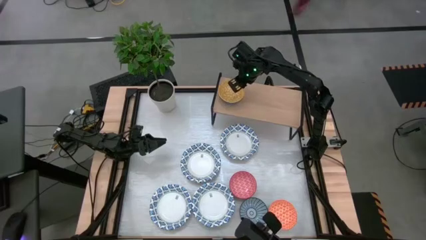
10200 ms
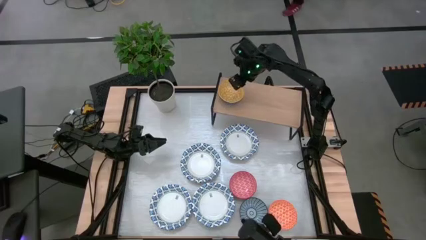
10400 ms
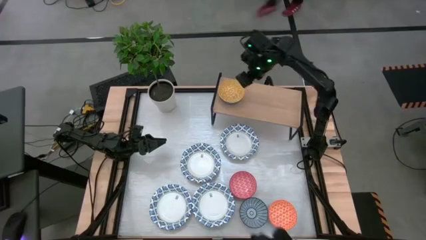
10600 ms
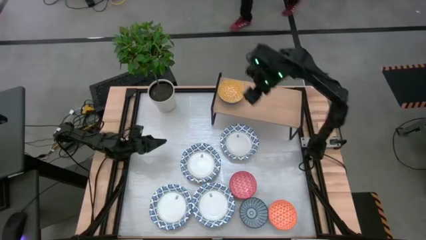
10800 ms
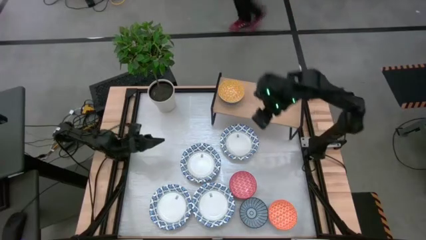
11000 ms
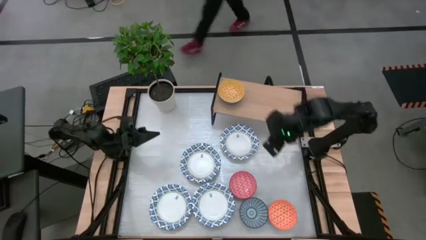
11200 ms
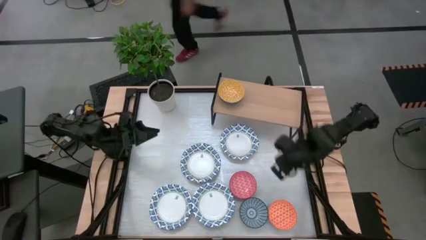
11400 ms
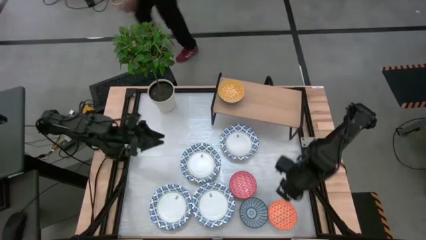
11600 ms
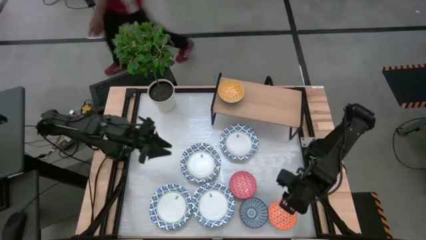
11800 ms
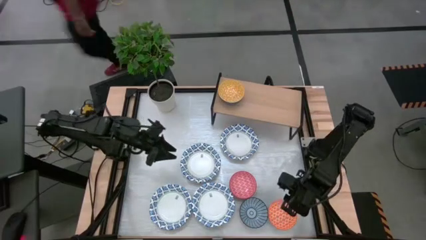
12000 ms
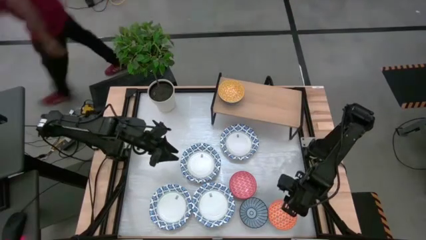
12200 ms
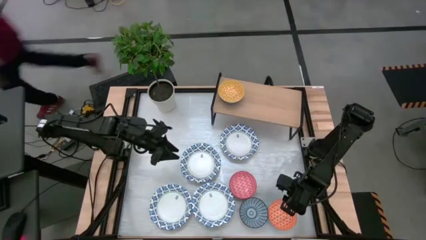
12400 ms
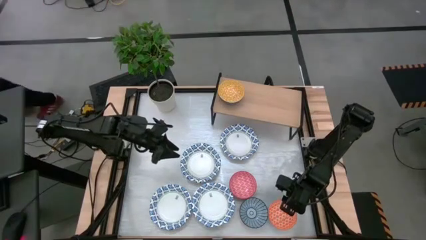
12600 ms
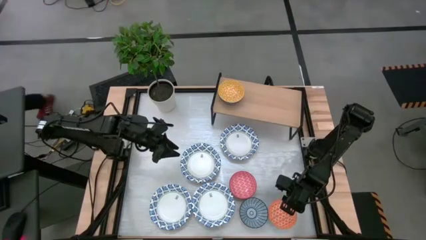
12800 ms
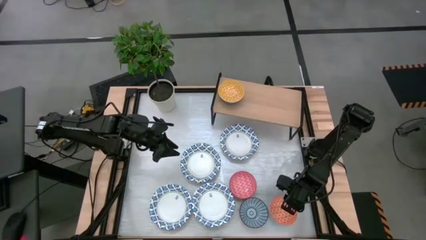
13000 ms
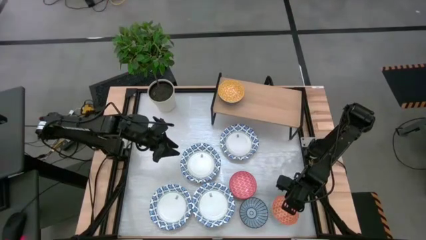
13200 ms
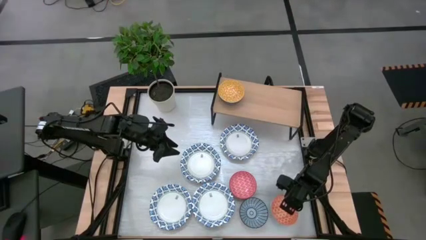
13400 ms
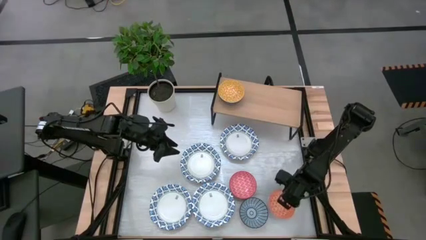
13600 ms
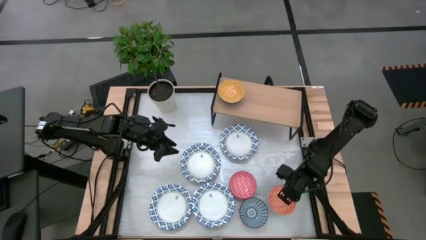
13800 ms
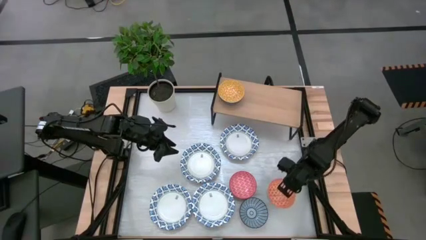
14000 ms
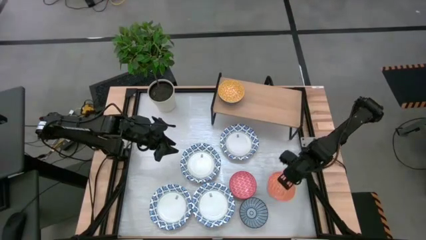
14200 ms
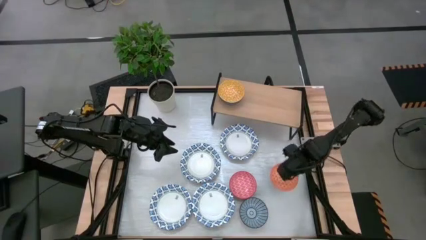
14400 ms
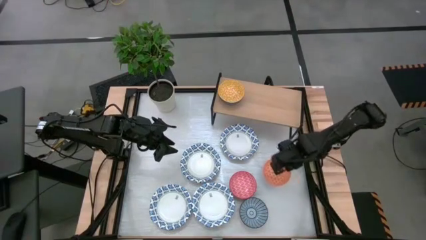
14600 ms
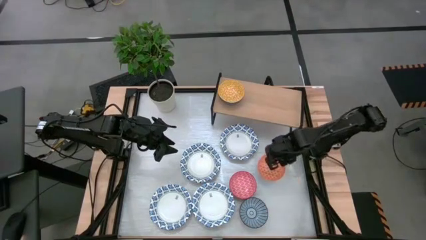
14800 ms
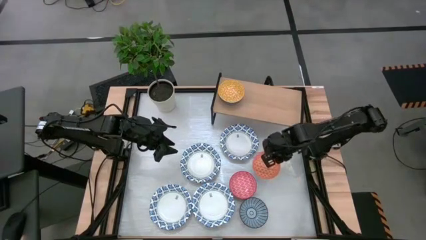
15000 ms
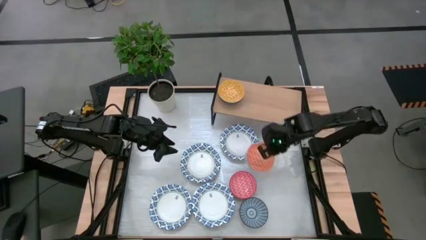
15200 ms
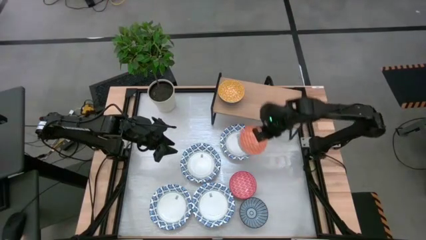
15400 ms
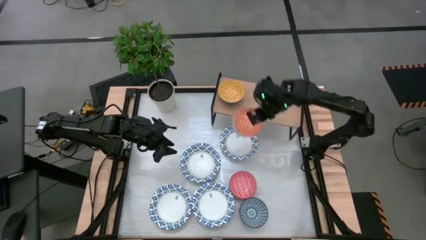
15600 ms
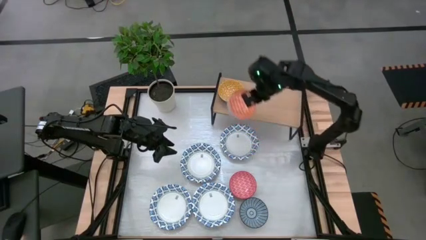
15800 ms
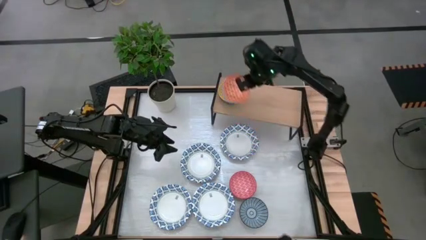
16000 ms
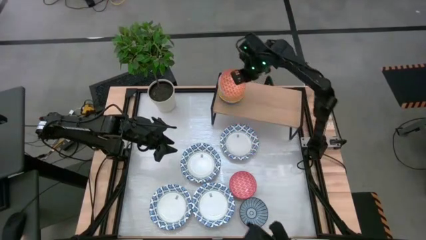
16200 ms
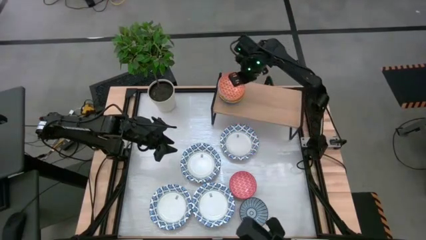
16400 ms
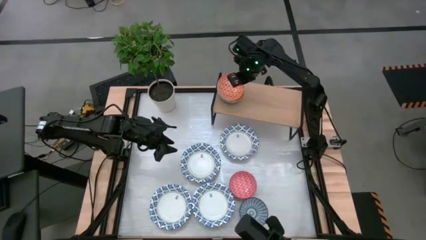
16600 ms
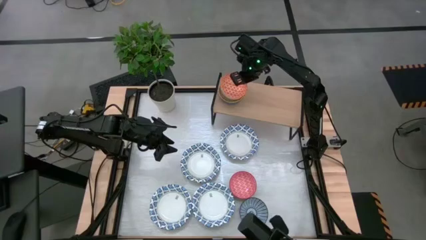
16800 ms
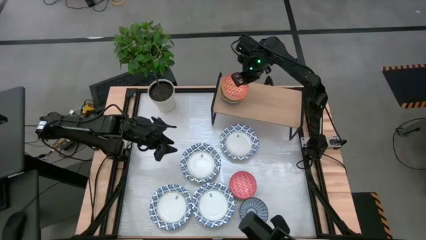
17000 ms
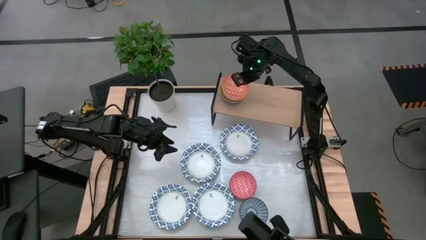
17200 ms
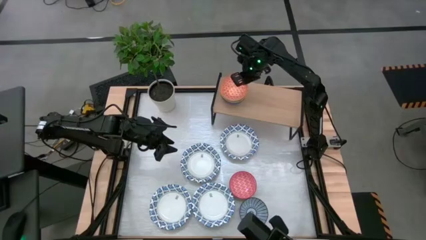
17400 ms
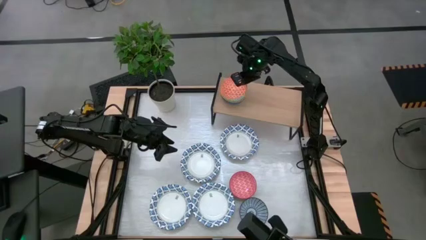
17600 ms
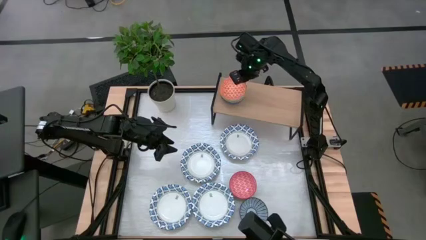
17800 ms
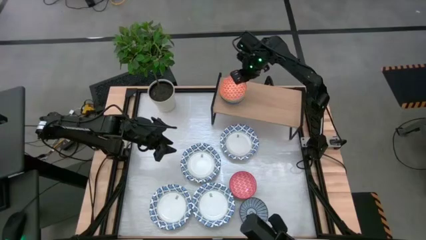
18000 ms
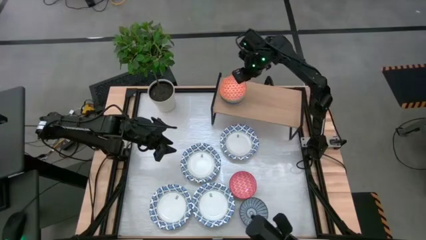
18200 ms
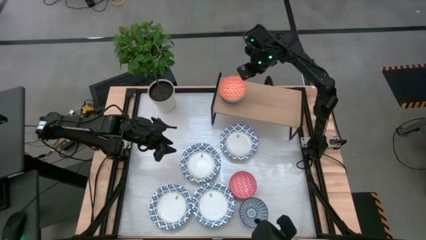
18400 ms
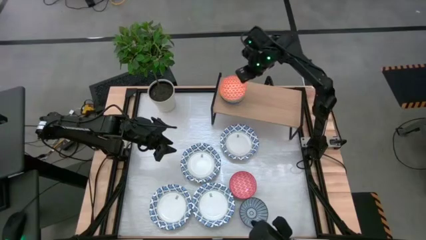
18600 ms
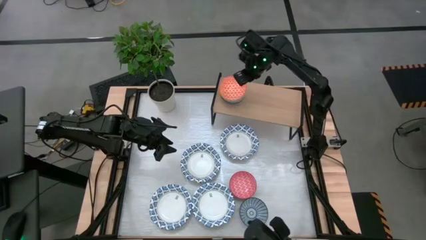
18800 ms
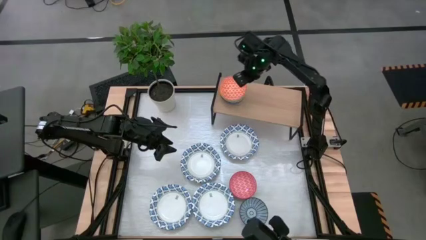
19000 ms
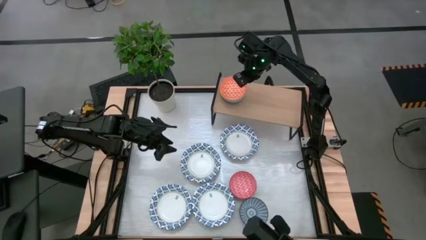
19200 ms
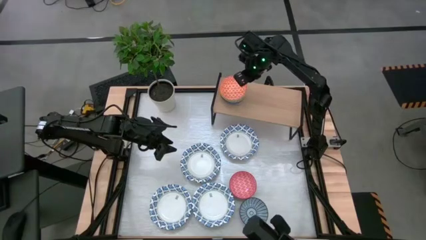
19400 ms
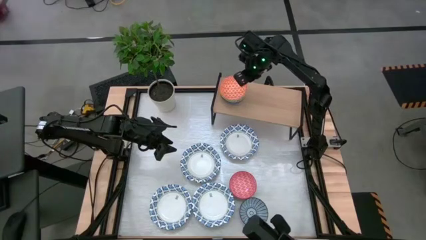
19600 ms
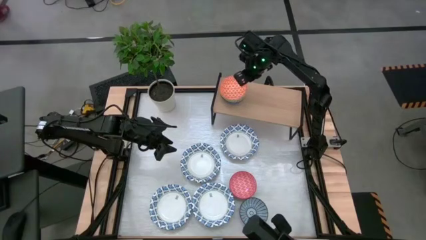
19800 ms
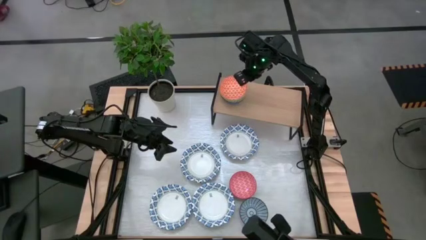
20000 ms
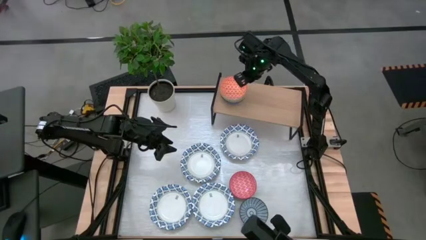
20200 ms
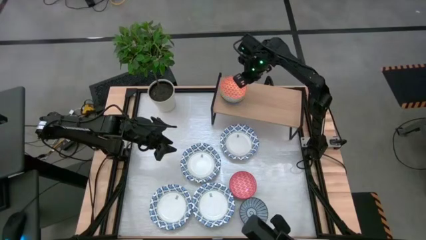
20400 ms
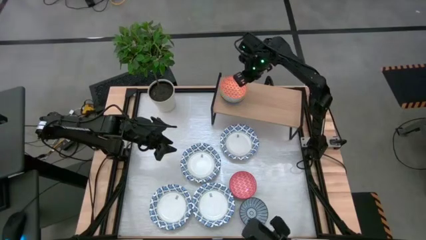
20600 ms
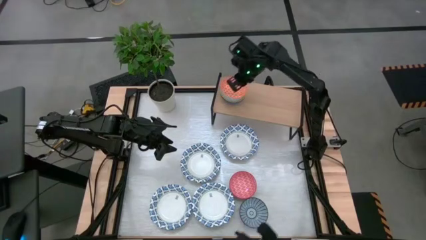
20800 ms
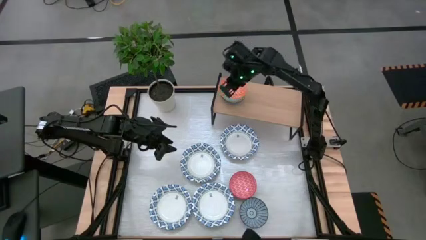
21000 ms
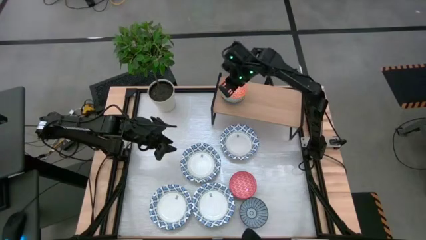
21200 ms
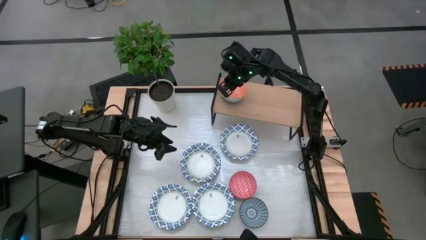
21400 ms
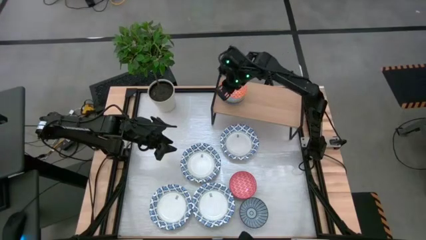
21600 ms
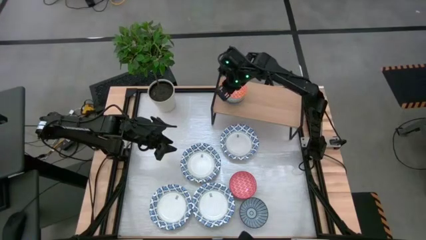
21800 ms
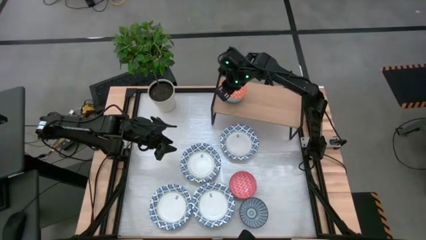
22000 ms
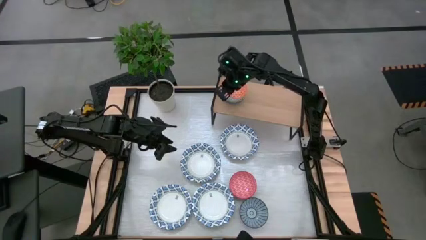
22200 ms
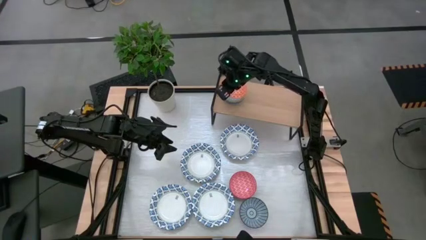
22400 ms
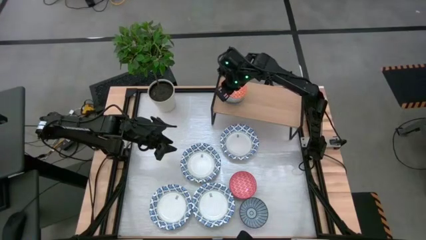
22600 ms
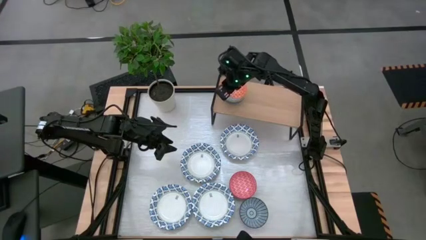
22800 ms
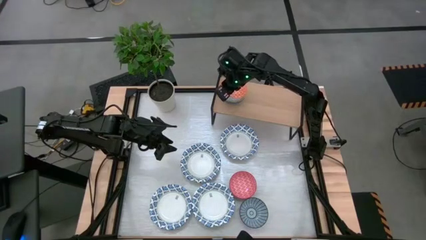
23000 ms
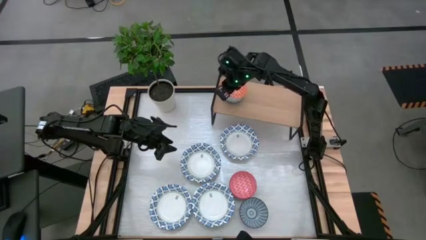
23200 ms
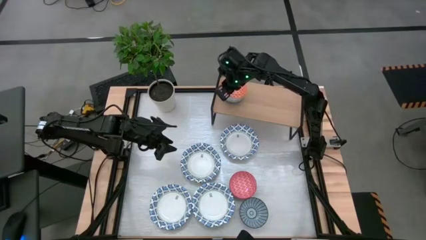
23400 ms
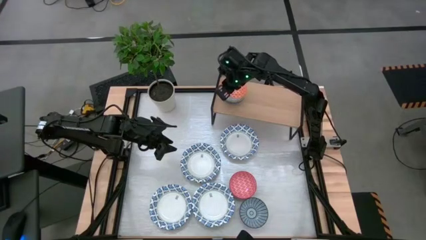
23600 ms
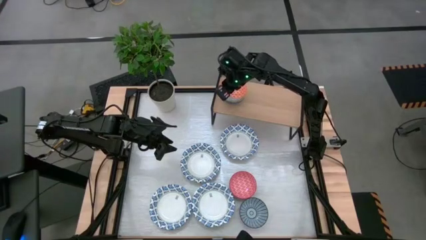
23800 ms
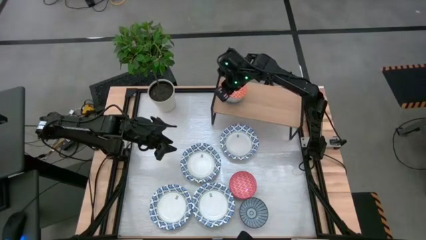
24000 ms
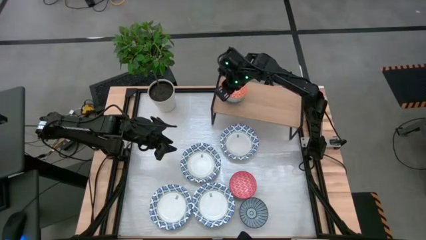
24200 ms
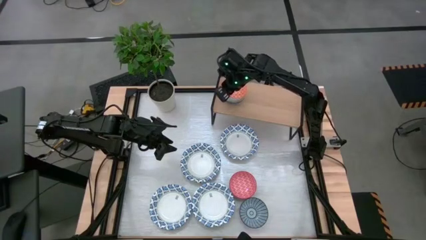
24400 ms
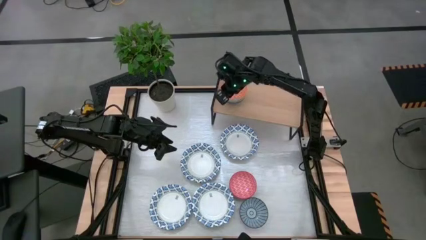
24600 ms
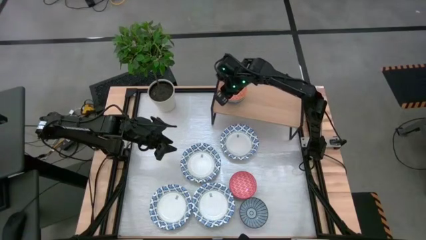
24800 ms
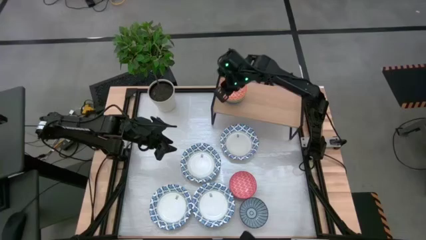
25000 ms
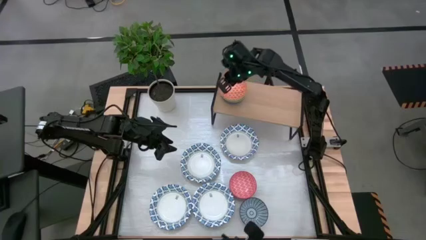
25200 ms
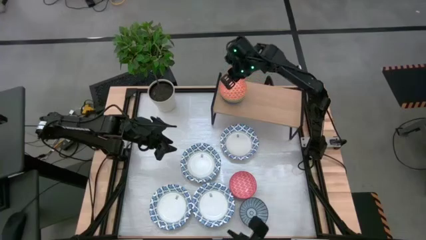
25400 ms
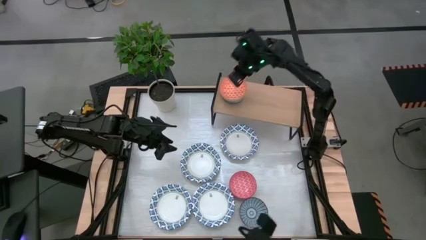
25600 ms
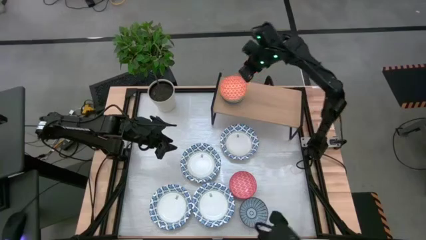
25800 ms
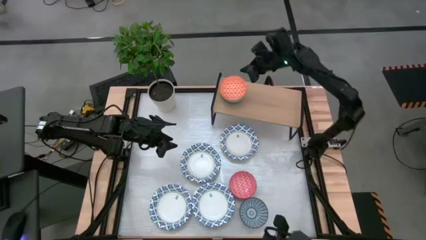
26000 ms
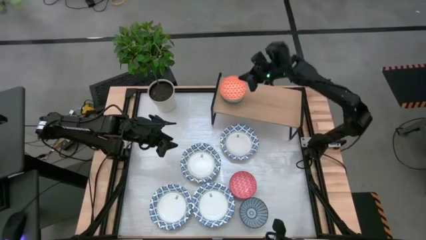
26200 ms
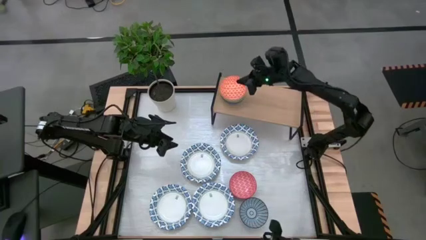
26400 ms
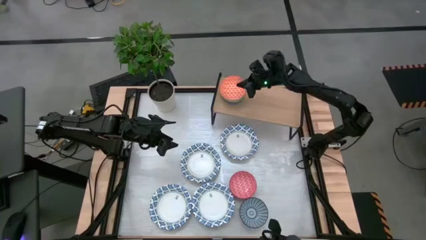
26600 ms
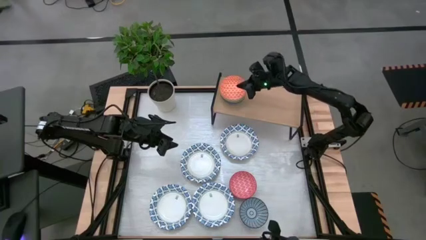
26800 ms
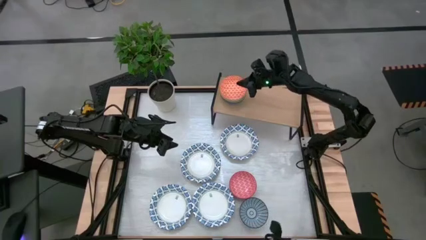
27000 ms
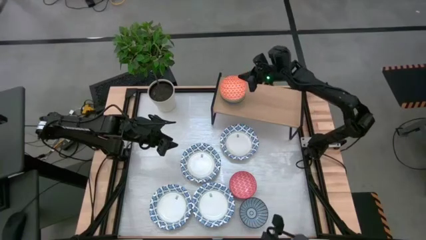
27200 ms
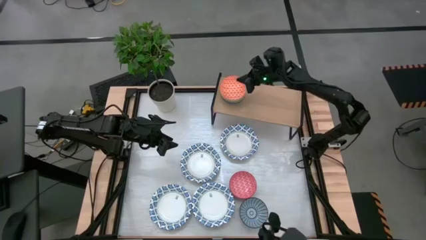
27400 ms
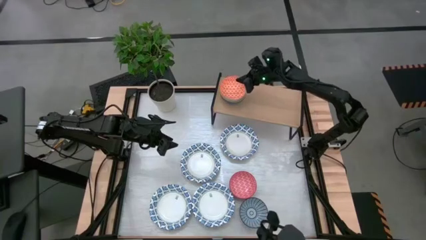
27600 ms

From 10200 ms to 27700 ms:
Task: Place and stack bowls onto a shelf
Stack the orange bowl on top of the yellow bowl on the shelf
